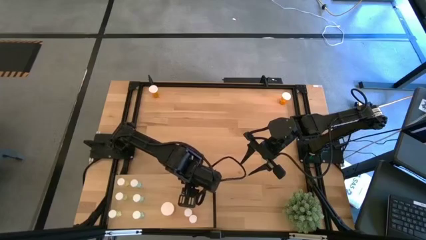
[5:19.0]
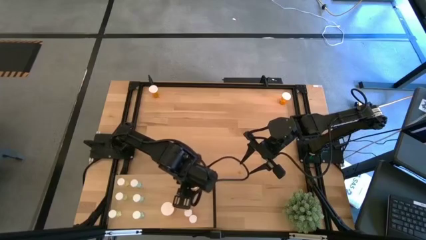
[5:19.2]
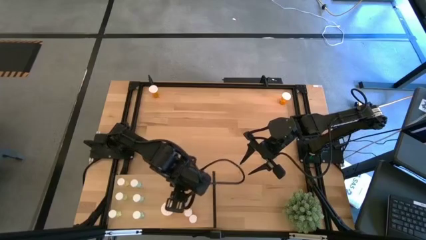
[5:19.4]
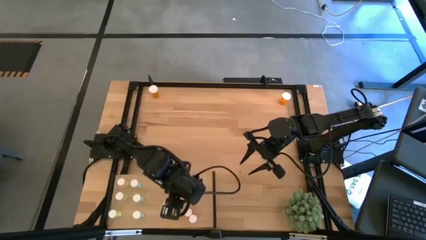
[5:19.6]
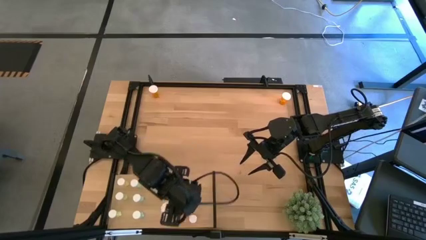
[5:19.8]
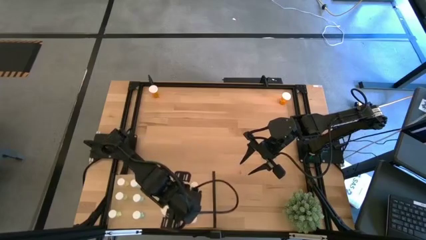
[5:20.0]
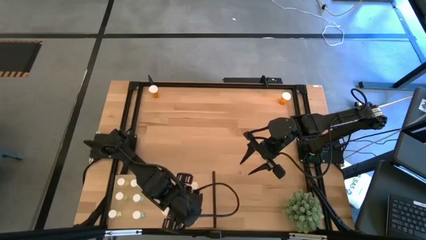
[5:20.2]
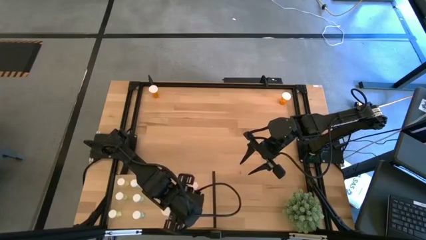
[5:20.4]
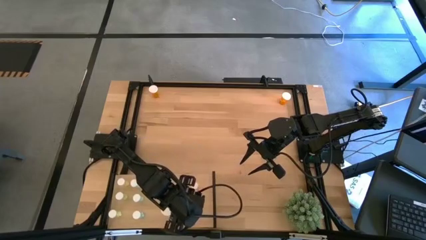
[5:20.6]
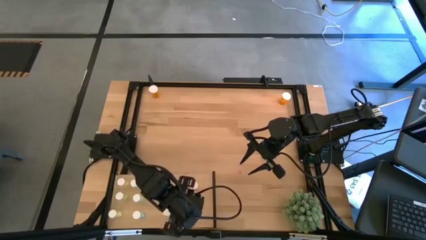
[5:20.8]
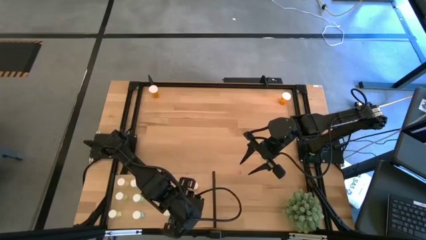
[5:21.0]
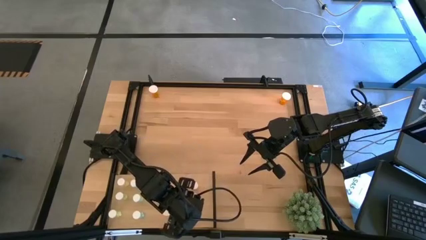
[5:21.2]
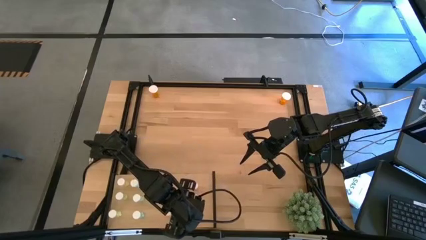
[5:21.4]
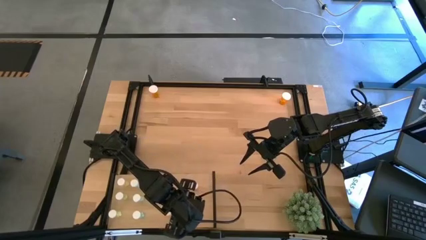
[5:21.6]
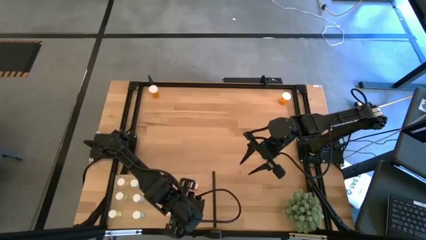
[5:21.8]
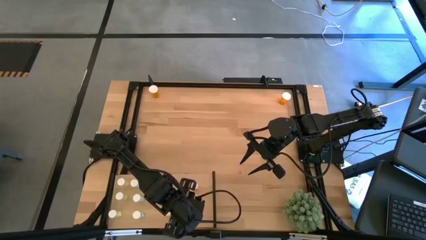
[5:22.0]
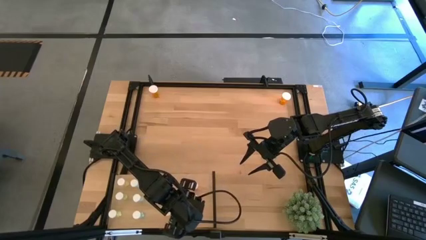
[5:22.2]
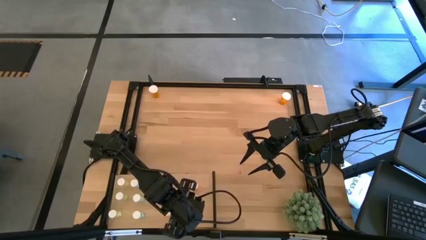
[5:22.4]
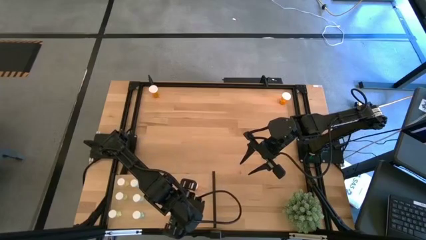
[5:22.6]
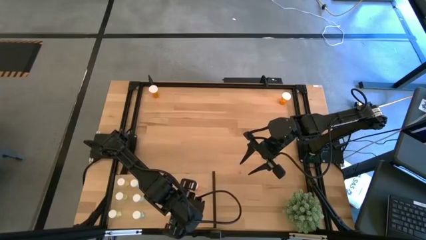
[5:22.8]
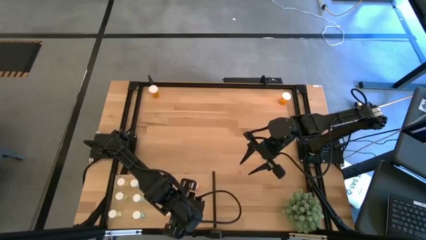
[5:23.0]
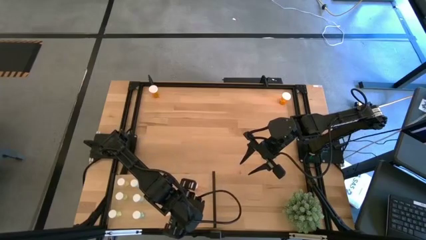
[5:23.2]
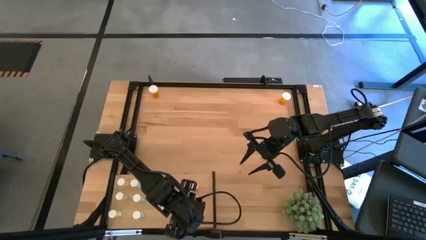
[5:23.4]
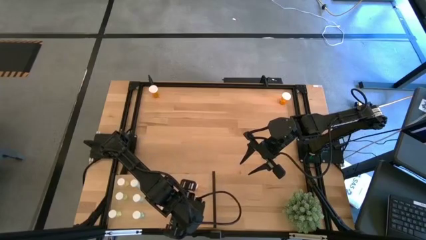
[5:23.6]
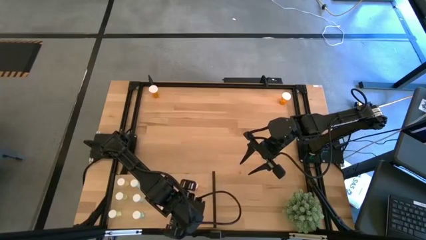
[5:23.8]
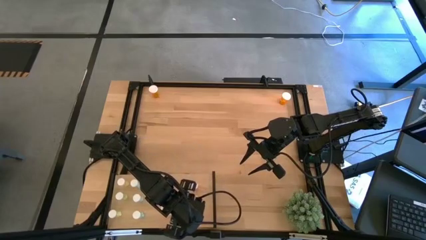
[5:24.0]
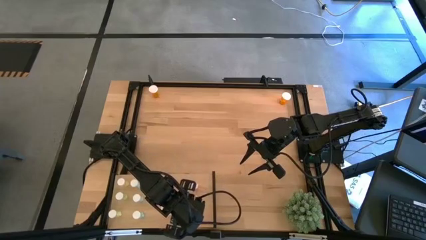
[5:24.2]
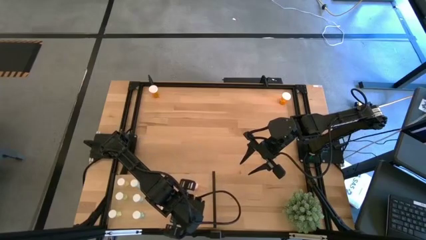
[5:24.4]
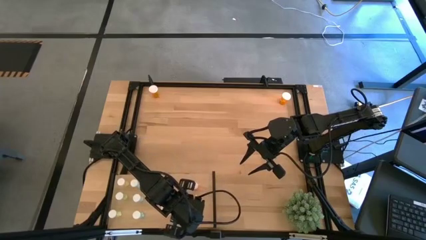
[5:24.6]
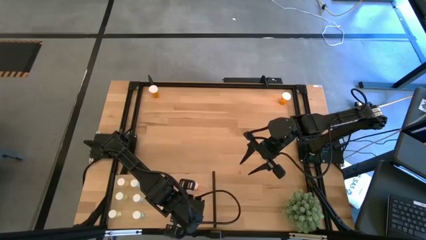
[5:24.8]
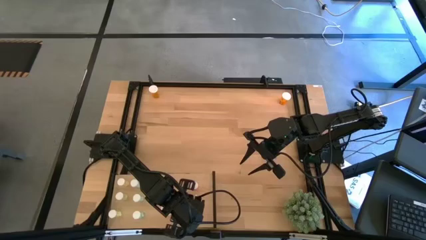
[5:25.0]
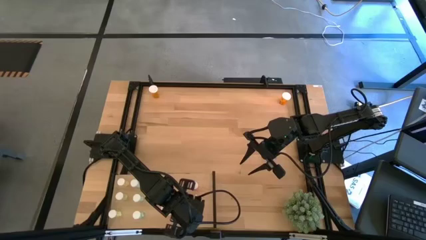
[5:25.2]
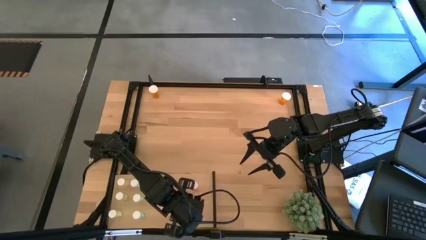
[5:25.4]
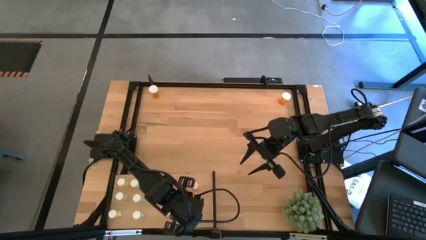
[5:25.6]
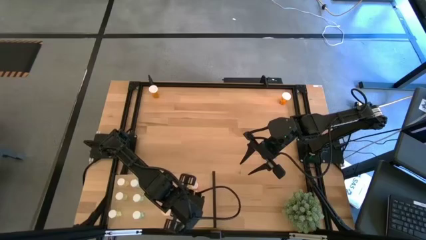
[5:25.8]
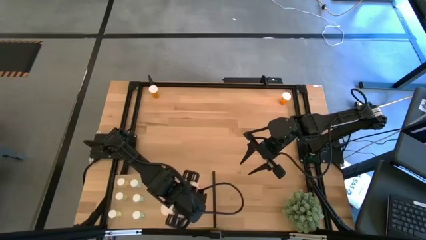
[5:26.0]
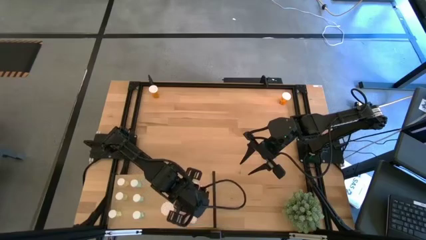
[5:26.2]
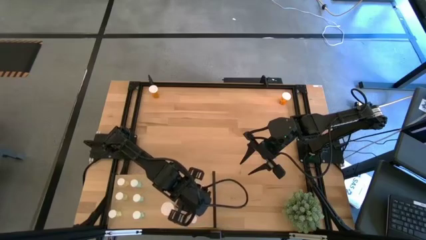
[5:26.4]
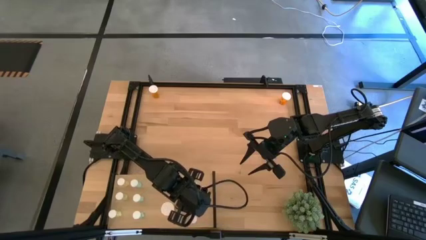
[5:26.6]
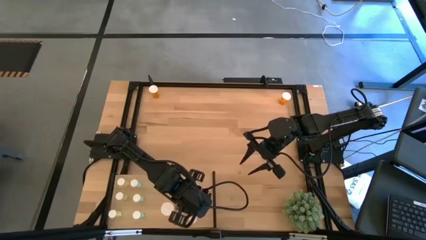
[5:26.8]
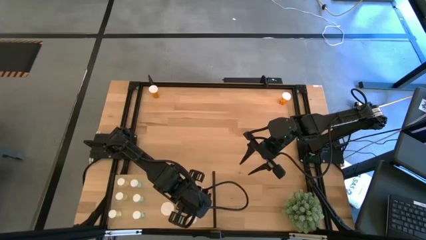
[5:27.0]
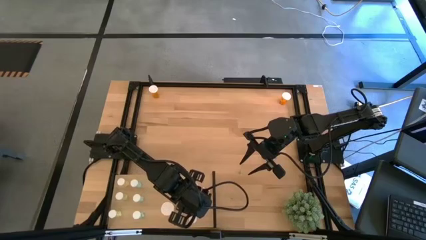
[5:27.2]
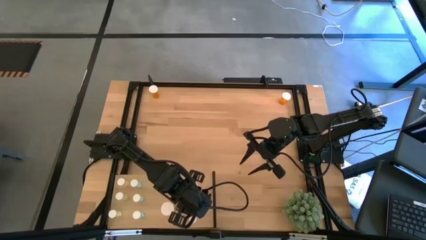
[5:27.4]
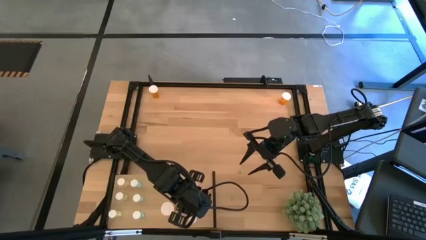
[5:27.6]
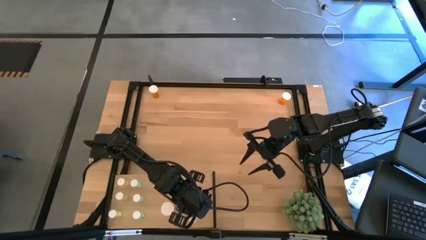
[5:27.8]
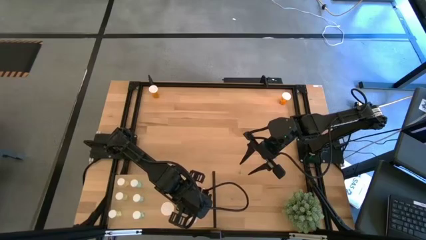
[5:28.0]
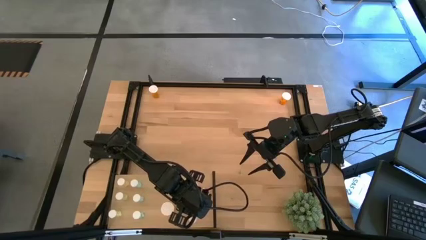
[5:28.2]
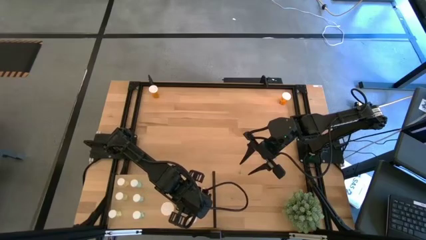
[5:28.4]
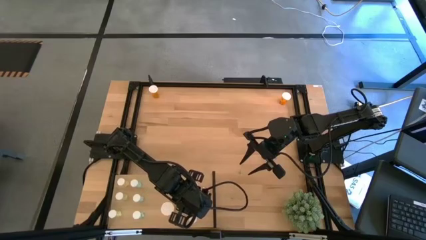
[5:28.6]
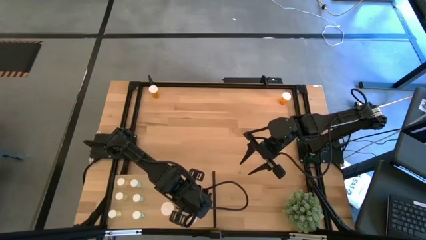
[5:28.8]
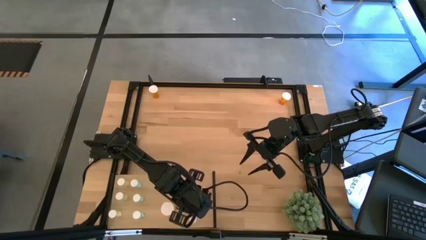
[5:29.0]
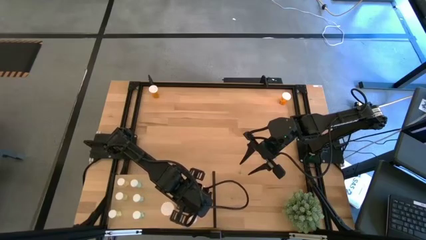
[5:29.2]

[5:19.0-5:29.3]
Task: Pick and place medicine bottles onto shelf by color
Adjust the pink pill bottle on the shelf

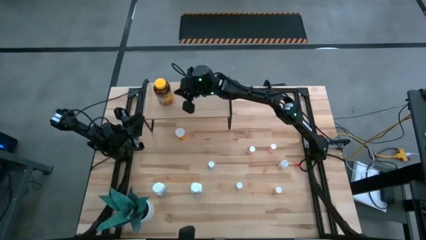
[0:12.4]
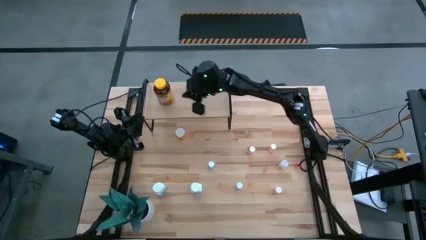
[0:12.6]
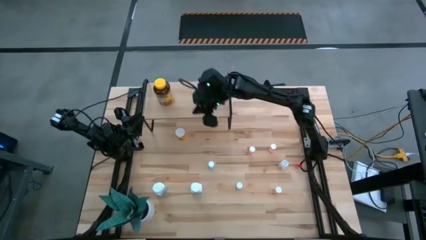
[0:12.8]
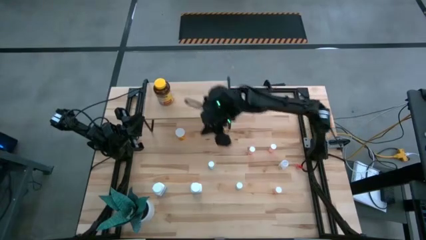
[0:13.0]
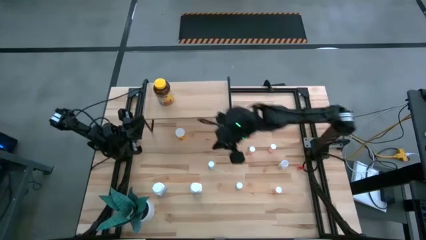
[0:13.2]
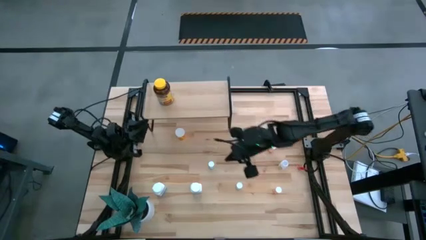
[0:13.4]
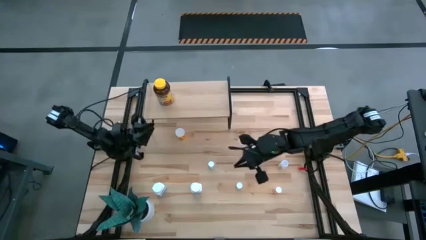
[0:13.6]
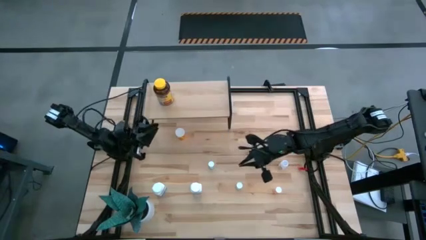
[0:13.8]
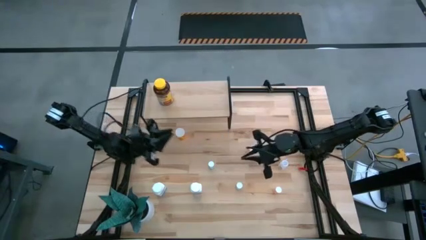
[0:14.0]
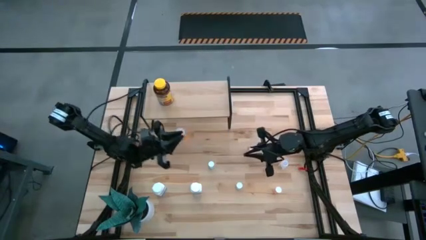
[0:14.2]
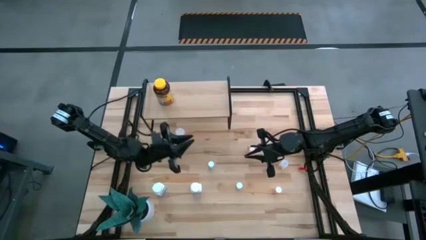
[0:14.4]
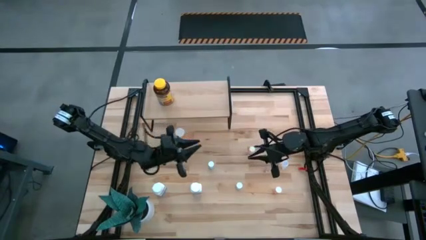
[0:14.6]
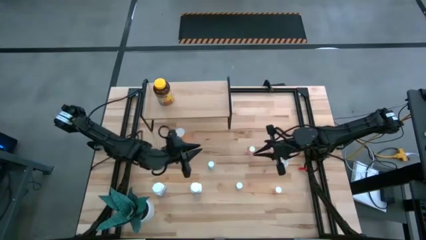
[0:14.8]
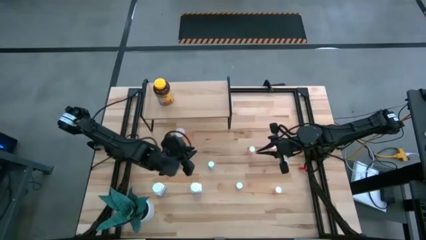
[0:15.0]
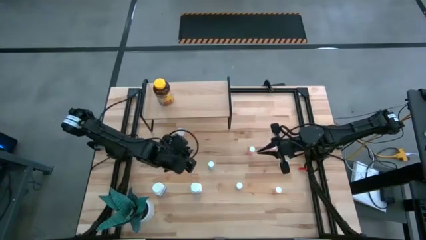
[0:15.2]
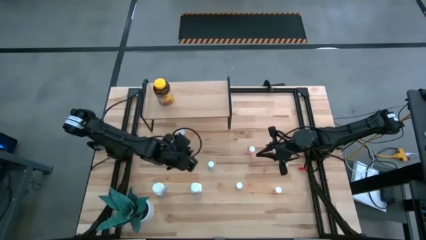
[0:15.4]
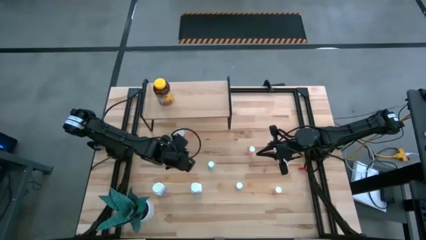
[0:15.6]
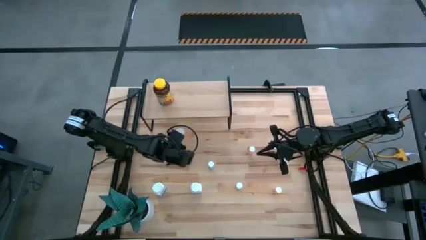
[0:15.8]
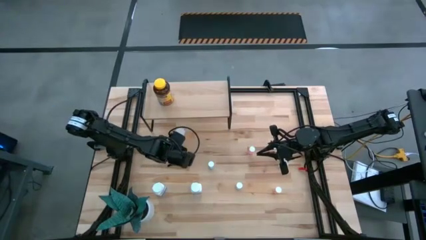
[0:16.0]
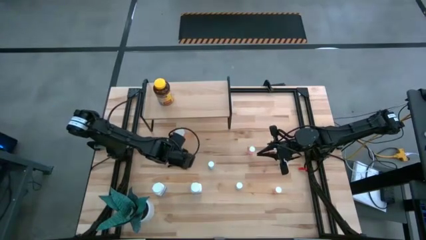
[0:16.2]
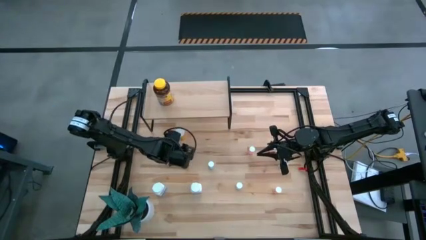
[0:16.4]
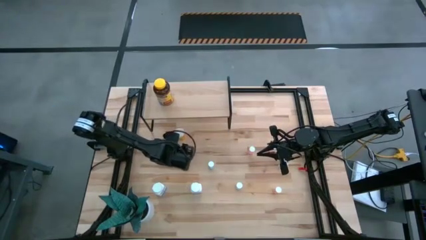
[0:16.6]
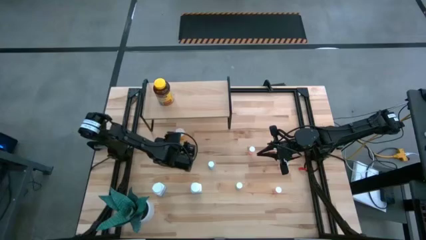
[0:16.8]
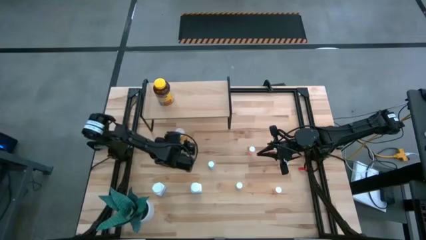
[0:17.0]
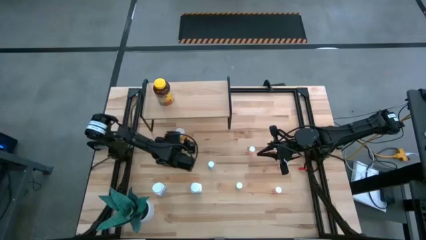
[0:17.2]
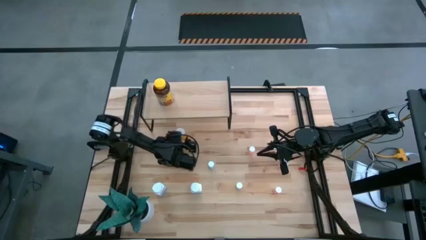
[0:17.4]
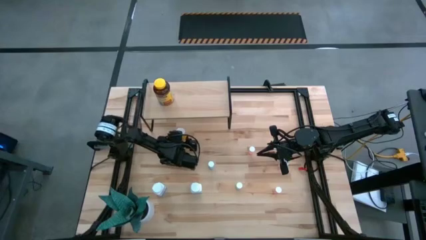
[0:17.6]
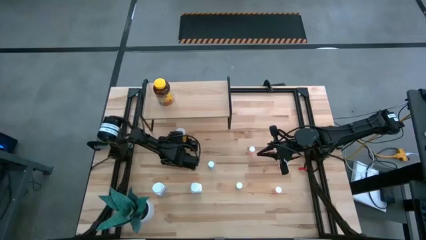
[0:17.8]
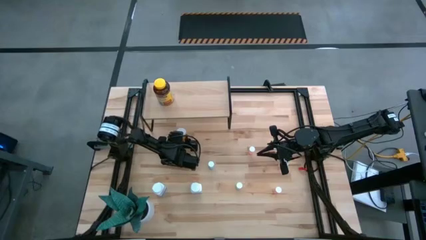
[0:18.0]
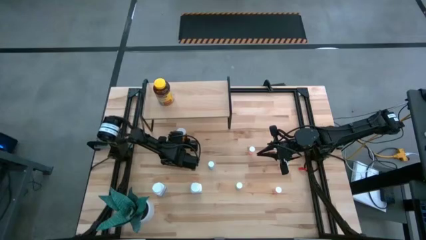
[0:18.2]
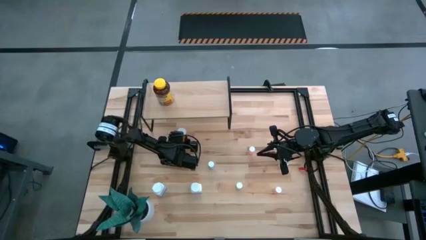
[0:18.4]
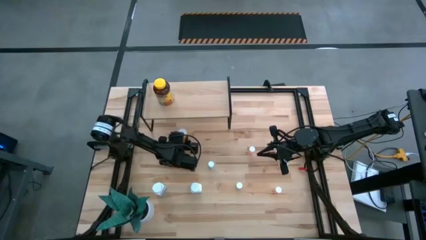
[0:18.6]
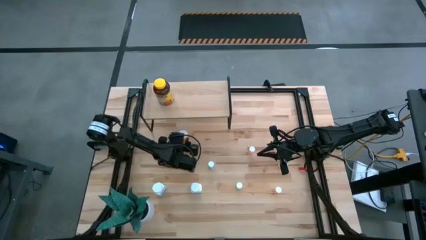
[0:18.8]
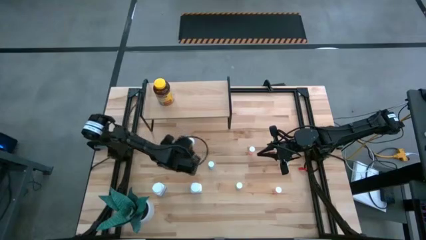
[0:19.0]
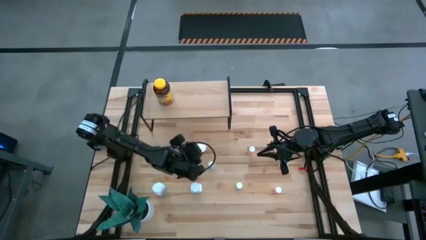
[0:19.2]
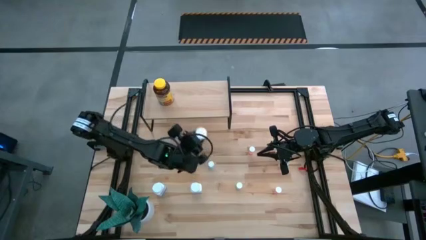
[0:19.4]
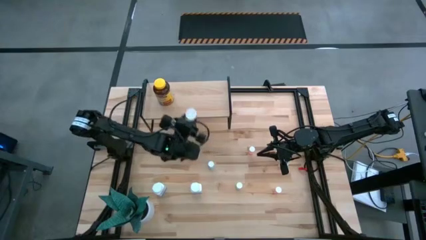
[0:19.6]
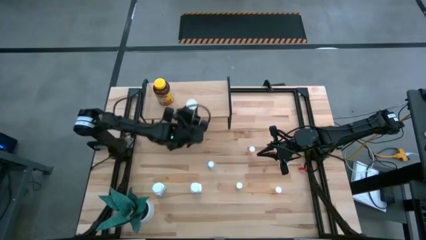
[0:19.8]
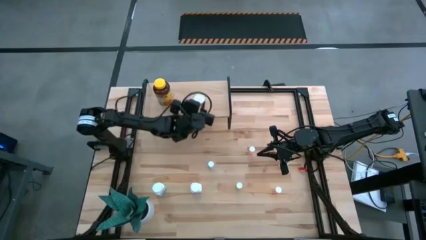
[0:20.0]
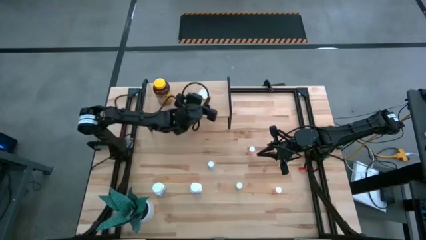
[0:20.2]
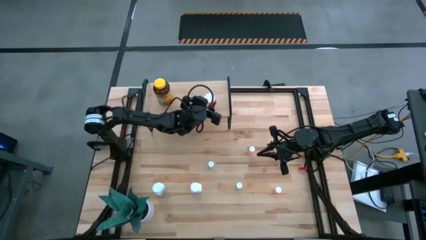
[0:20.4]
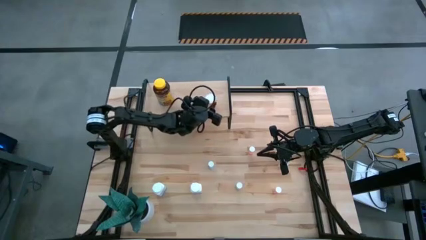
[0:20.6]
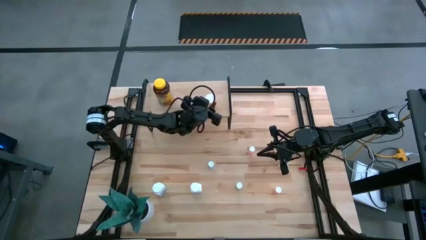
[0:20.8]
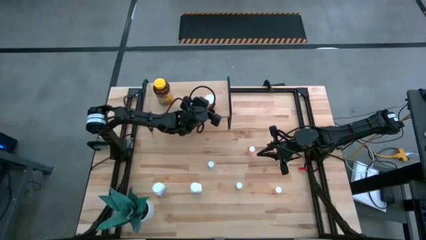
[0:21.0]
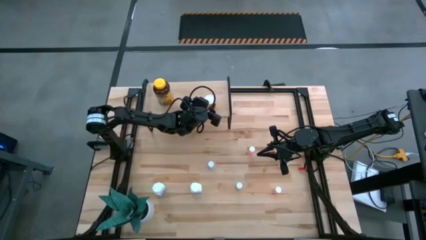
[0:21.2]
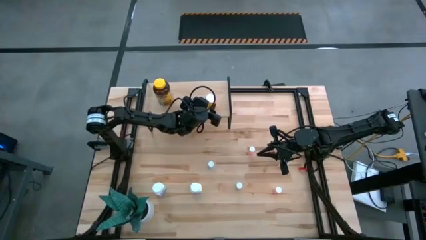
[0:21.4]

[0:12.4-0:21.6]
Task: Pick and place medicine bottles onto shelf by color
Put the orange pill bottle on the shelf
